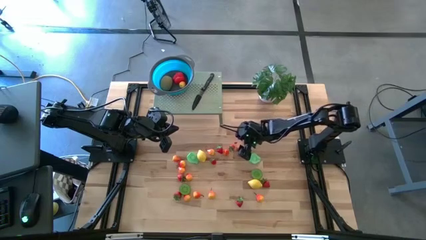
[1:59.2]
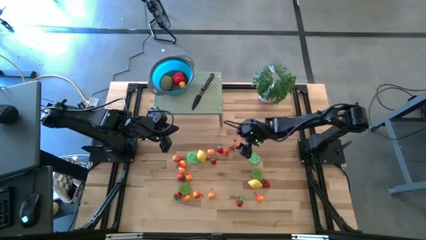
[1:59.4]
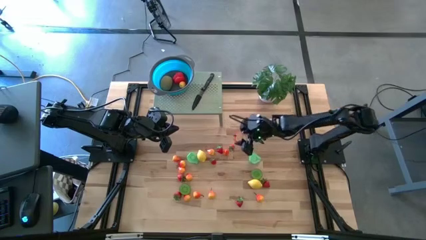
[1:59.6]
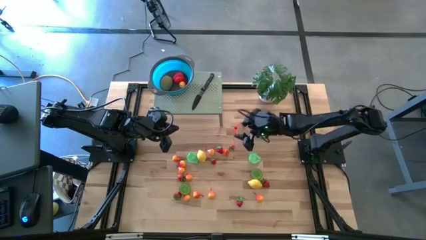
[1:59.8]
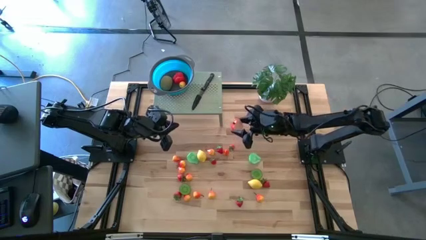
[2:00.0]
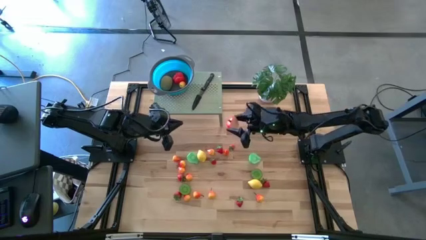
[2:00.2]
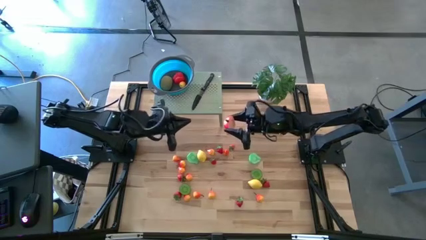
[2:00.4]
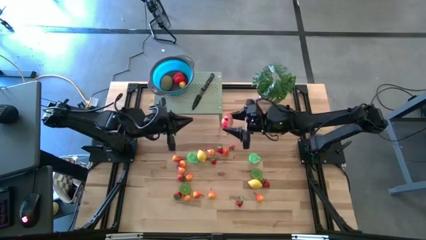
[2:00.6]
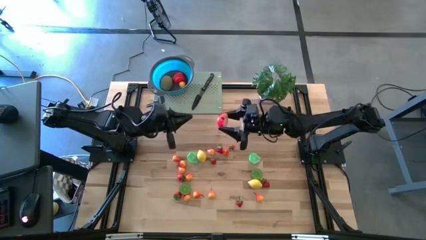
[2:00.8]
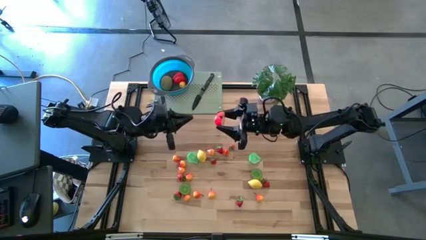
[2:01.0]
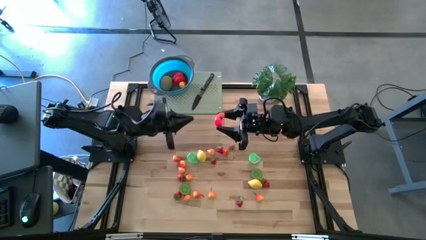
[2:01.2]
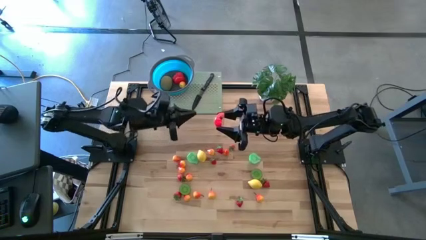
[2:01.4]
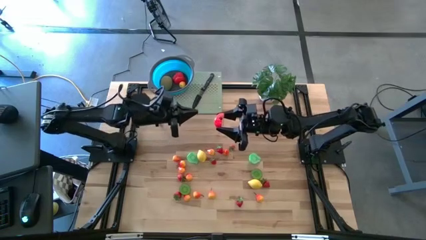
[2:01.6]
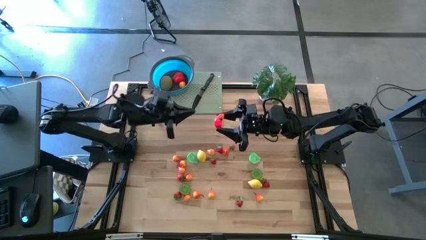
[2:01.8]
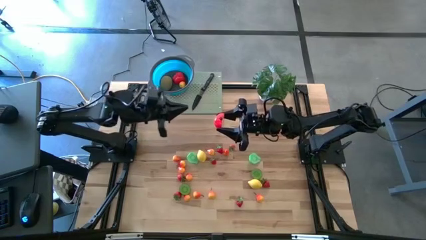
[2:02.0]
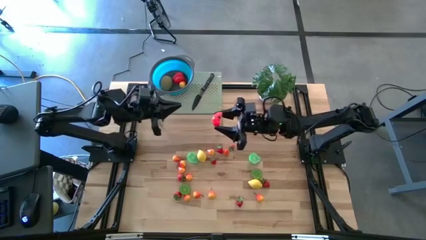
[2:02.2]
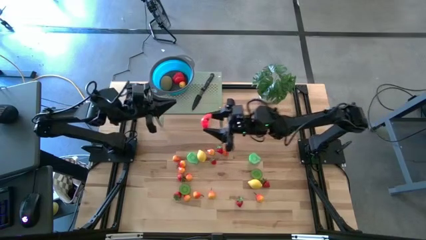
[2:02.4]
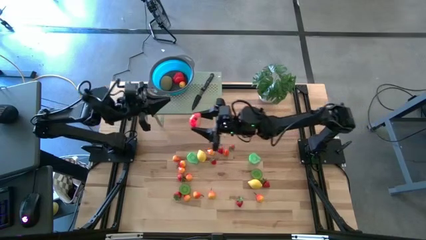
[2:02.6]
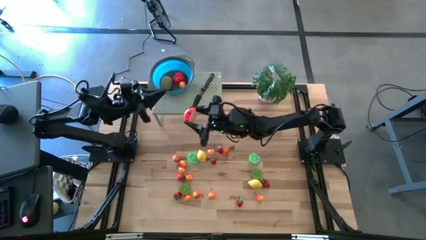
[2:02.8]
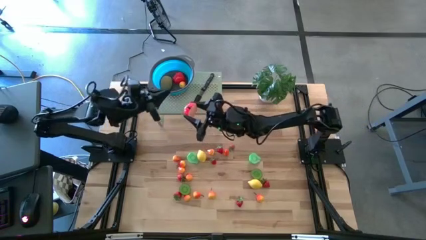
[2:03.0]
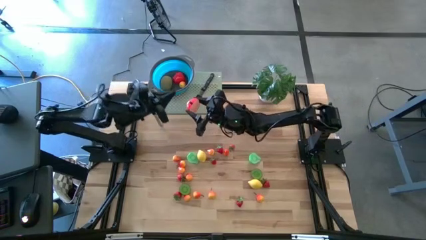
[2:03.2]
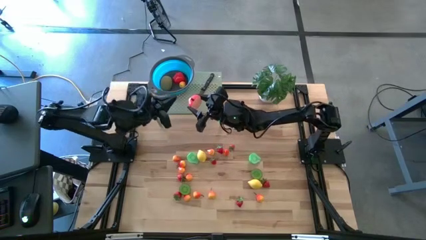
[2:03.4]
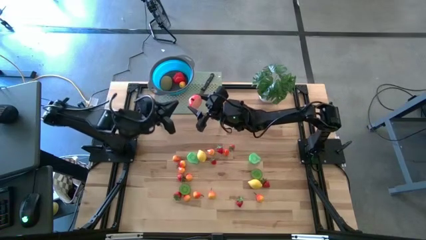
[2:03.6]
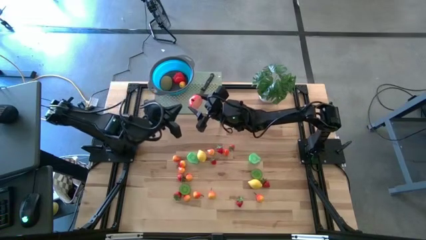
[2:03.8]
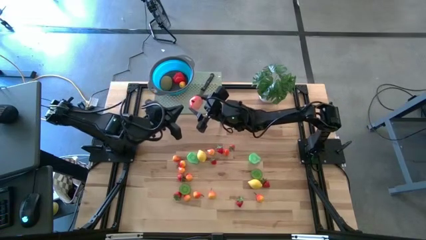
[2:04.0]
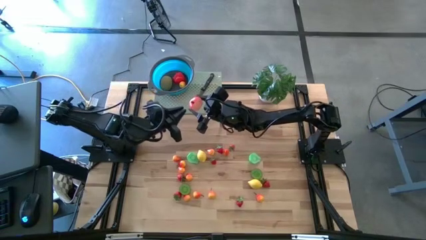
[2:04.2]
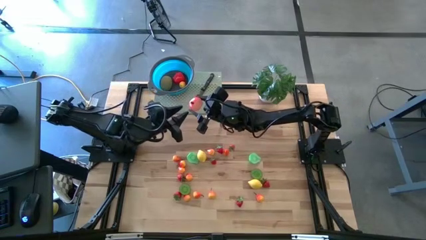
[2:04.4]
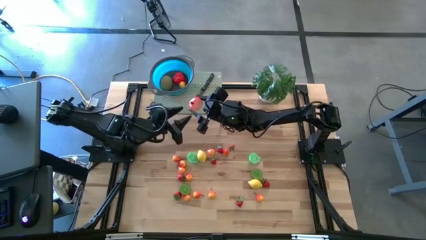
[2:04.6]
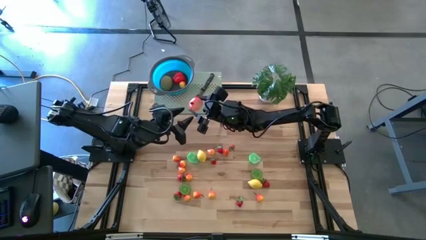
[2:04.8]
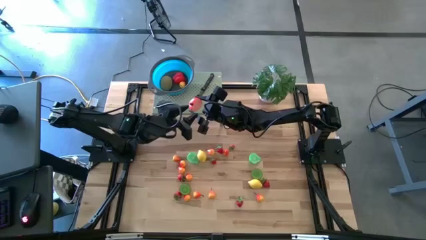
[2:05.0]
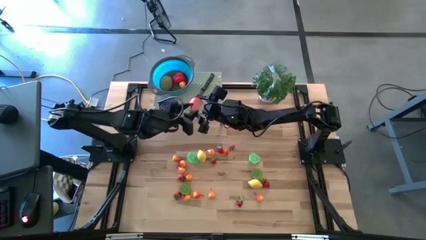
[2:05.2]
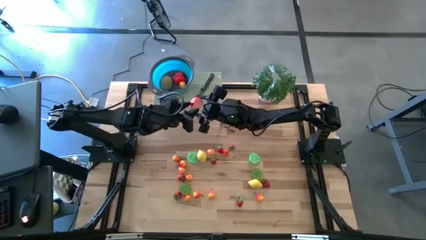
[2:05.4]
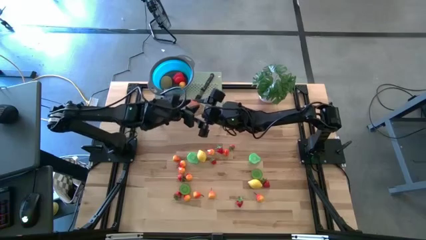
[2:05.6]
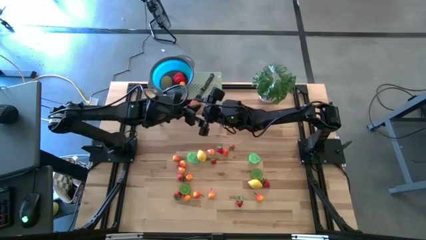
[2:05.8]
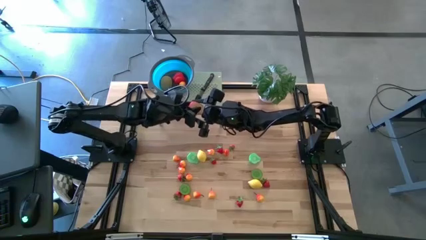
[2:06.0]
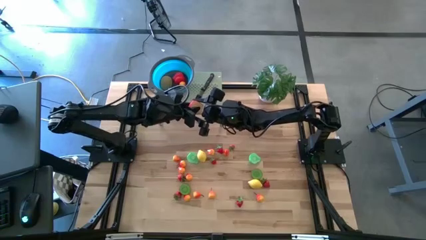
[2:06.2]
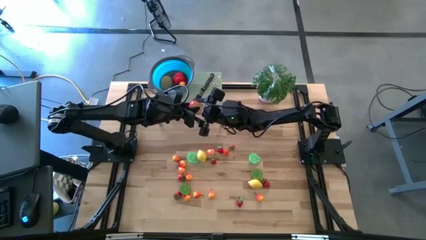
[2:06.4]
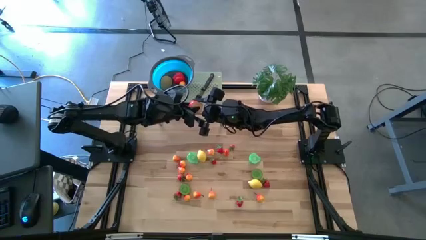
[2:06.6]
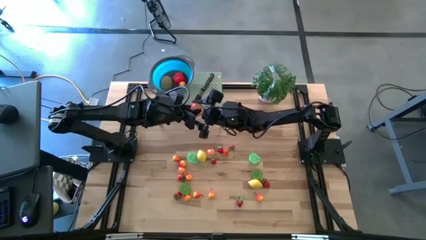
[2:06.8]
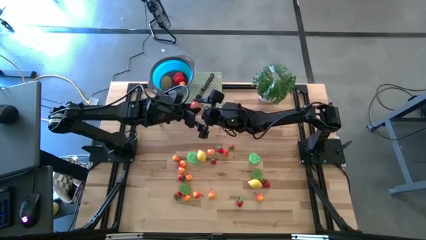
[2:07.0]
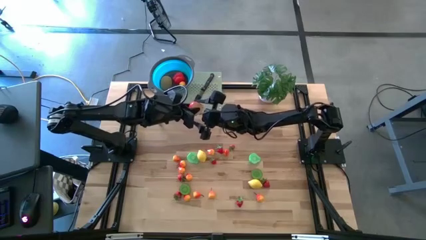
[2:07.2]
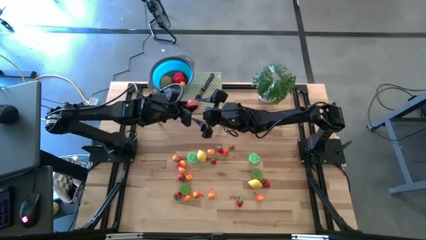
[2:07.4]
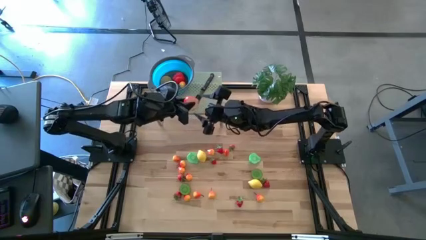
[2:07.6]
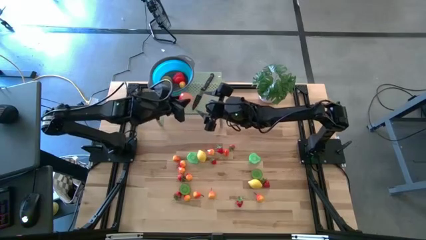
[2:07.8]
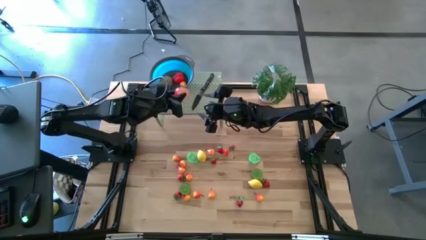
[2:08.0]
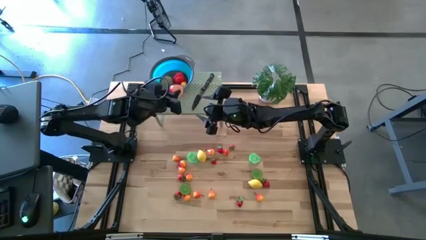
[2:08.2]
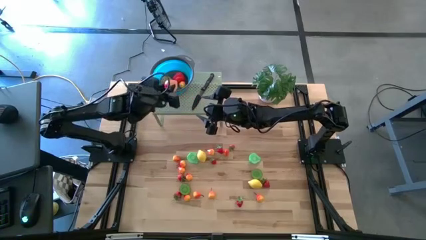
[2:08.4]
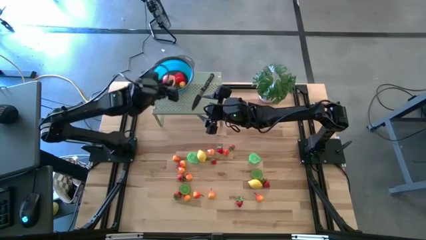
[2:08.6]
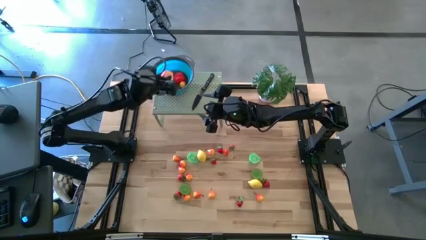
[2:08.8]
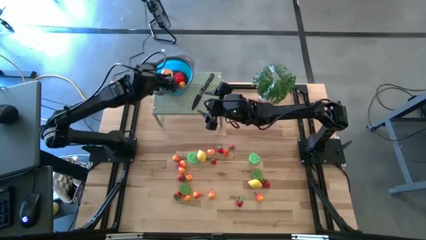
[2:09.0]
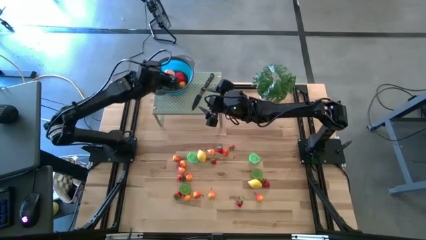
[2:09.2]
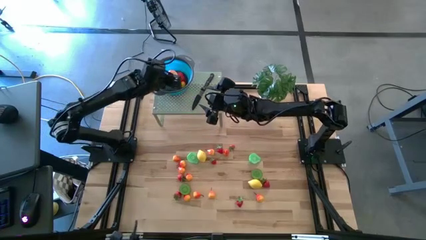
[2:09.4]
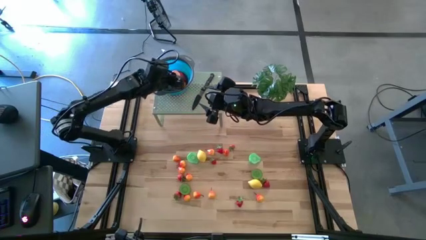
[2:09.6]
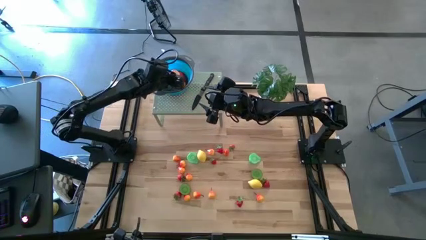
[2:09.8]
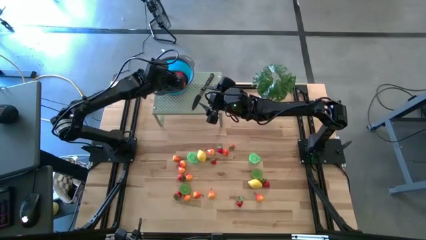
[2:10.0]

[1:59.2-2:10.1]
Task: Pick & Place Fruit
Put the half apple into the strainer bowl on the shelf

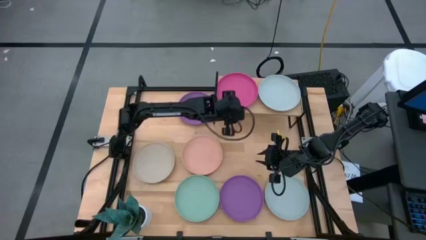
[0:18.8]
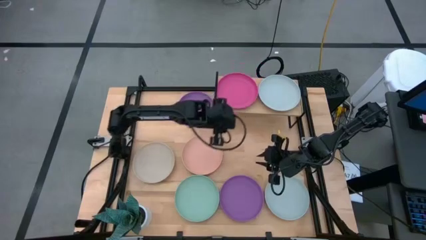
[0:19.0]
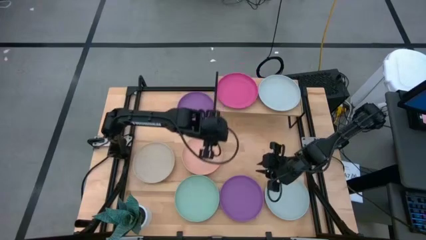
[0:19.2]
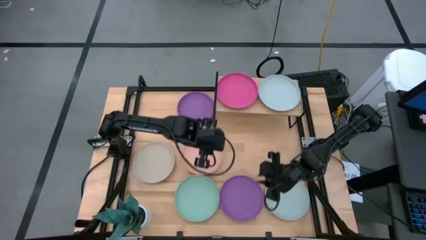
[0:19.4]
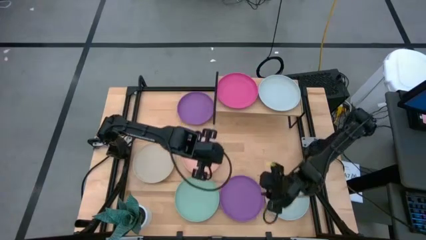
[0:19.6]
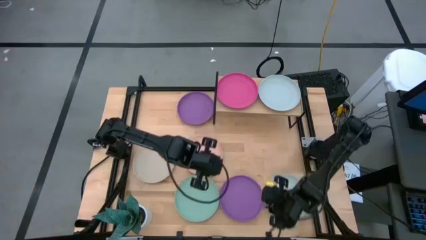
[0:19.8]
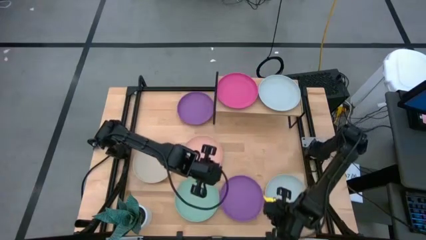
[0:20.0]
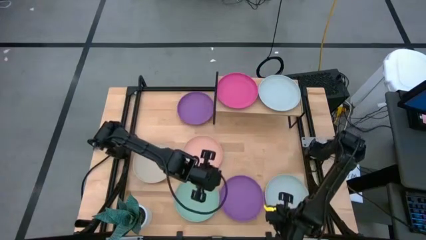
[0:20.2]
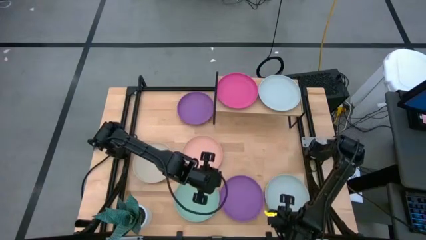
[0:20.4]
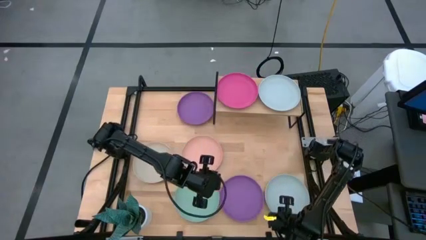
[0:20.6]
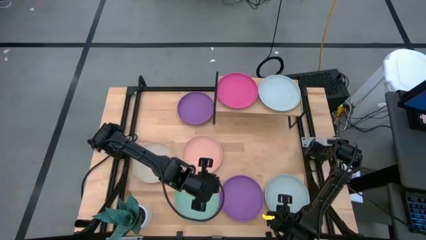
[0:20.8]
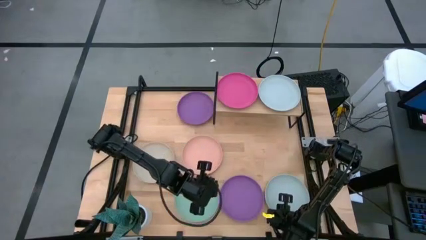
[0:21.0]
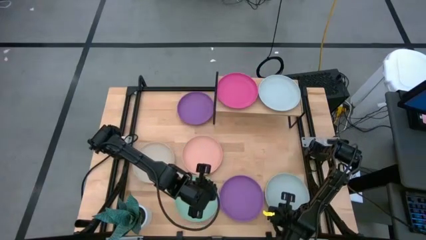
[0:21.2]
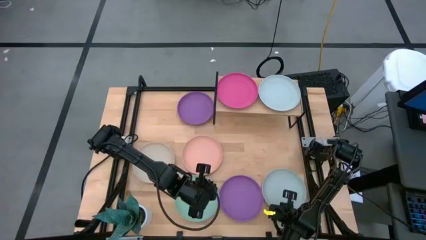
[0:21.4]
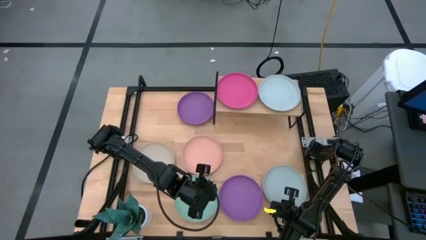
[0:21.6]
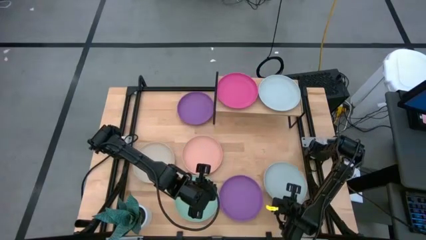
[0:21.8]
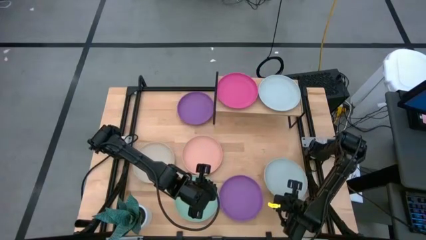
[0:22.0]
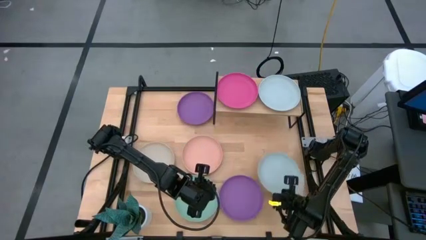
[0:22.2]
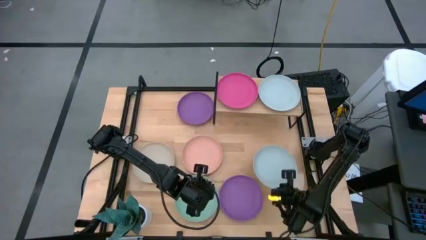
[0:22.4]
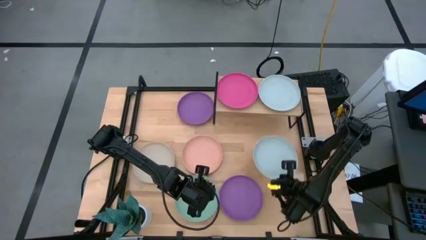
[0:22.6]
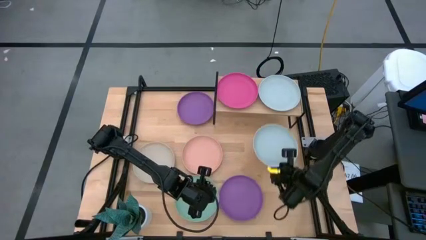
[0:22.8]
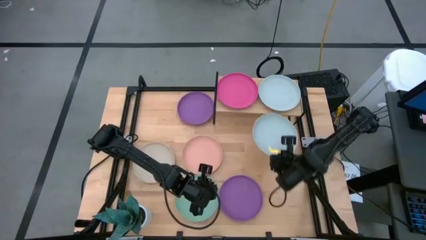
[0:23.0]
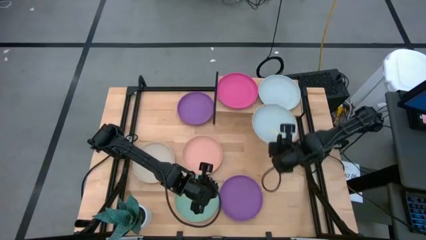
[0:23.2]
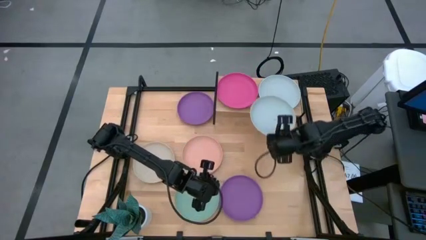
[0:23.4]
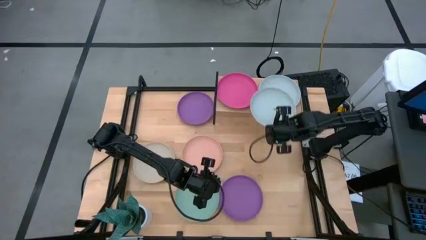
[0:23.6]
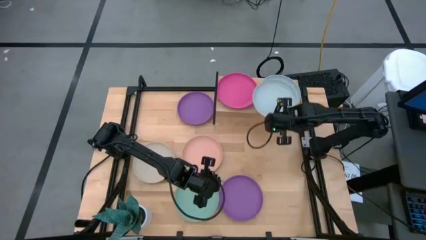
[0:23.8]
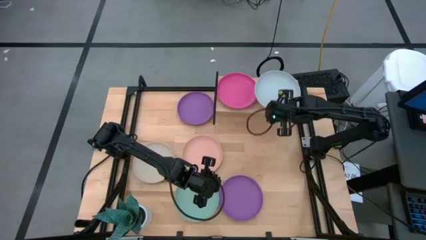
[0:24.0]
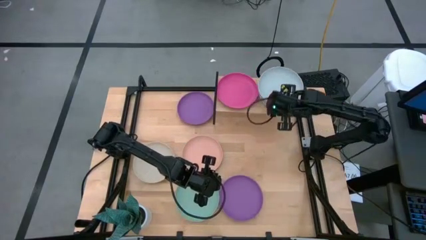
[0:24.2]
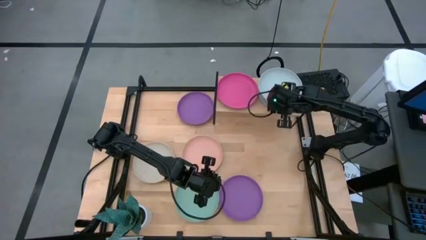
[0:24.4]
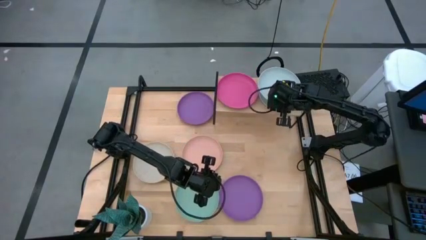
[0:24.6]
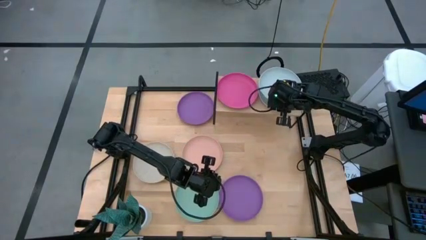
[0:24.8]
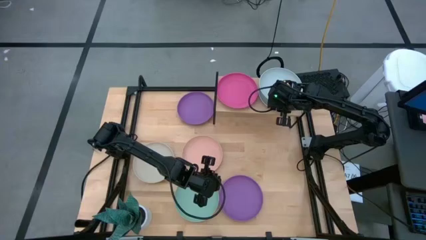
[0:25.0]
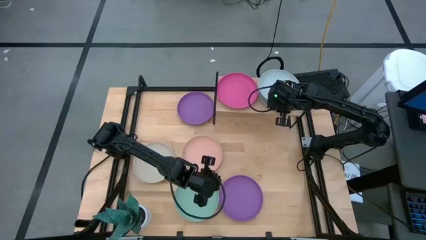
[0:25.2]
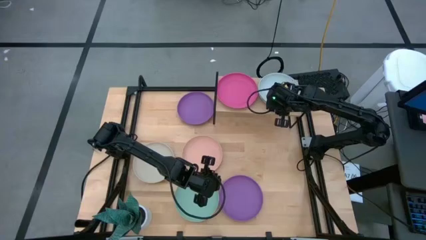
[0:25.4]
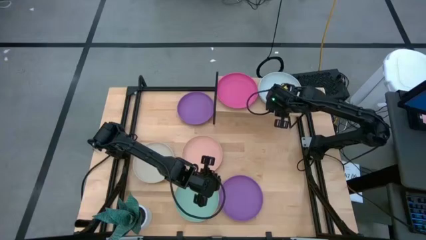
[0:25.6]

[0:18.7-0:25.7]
Task: Place and stack plates onto a shelf
Stack the light blue plate on top of the light blue plate on the shelf
